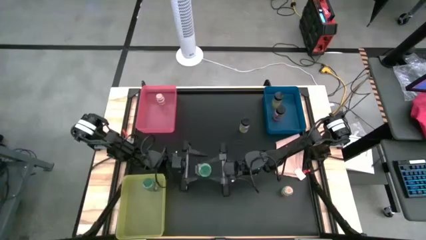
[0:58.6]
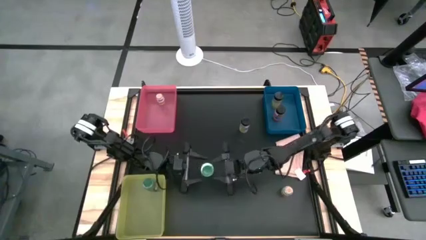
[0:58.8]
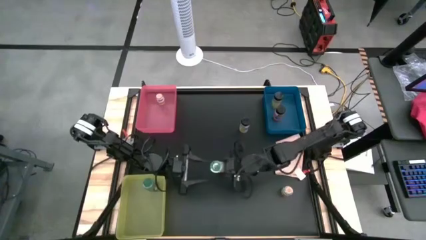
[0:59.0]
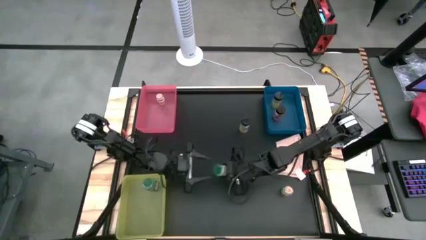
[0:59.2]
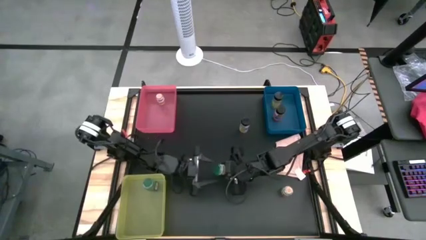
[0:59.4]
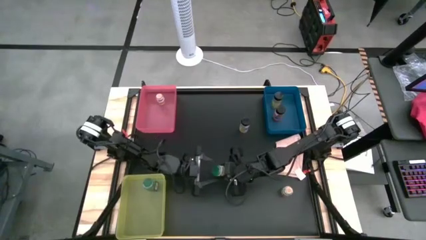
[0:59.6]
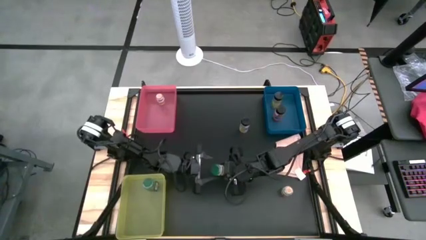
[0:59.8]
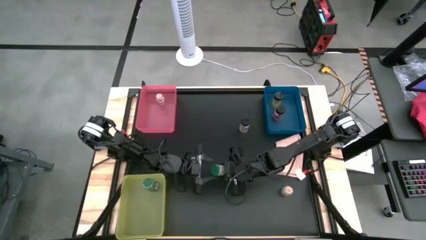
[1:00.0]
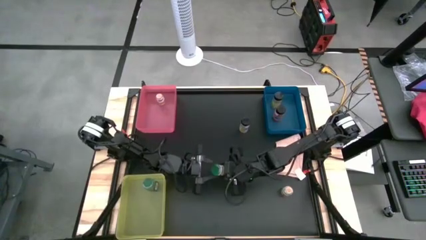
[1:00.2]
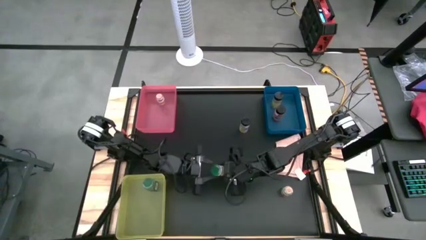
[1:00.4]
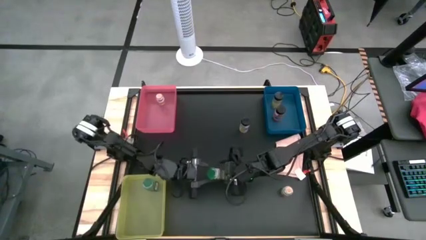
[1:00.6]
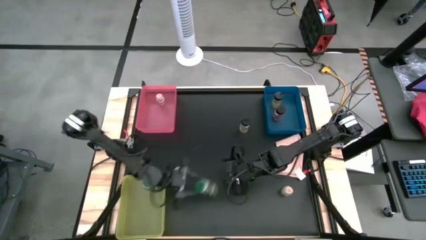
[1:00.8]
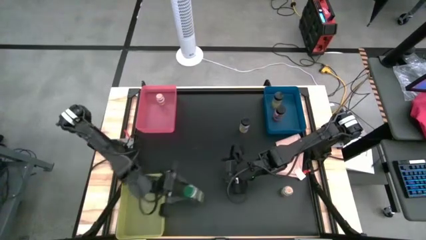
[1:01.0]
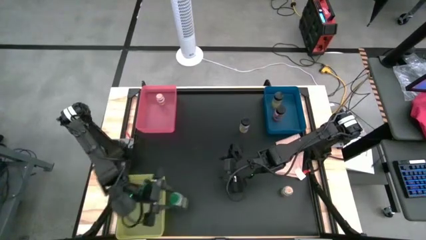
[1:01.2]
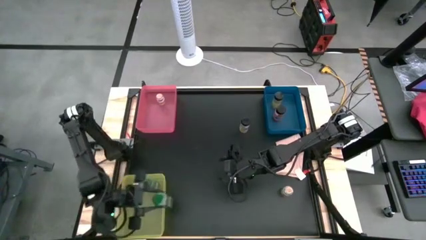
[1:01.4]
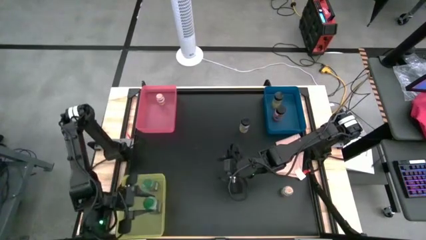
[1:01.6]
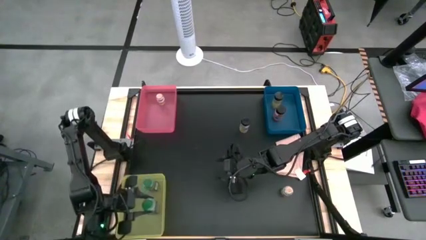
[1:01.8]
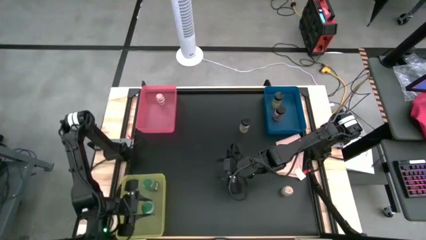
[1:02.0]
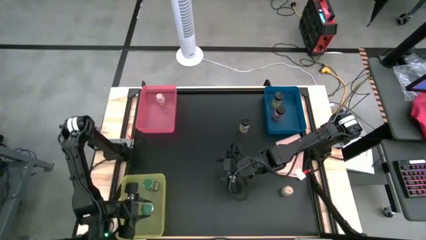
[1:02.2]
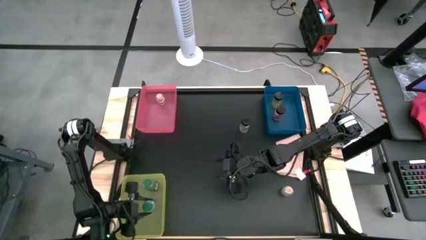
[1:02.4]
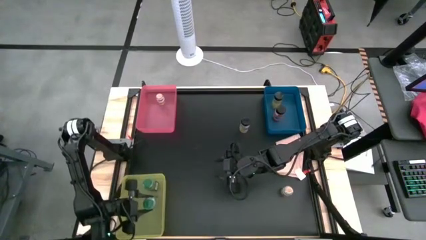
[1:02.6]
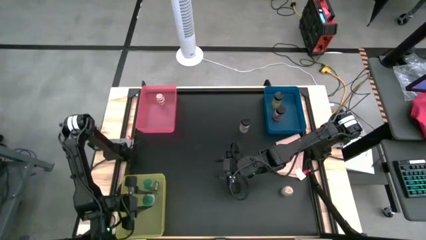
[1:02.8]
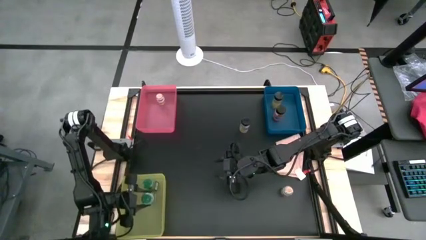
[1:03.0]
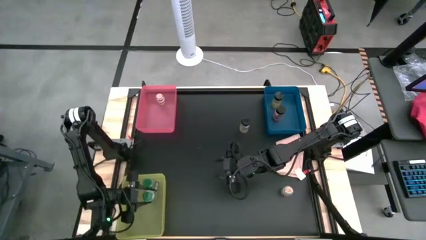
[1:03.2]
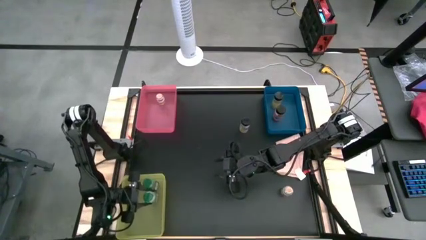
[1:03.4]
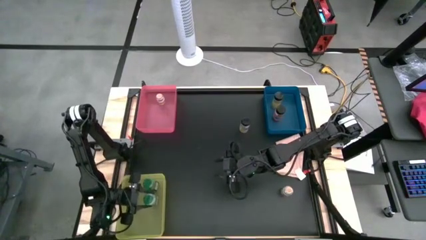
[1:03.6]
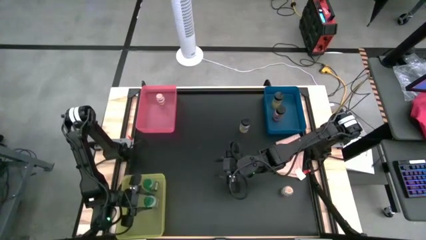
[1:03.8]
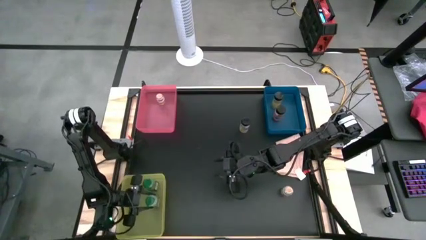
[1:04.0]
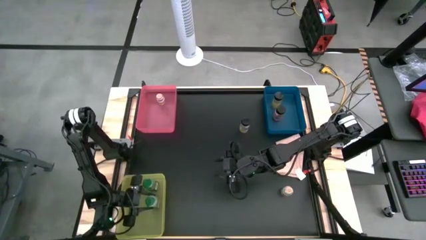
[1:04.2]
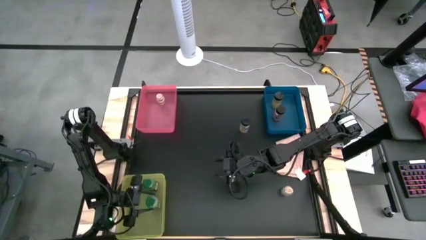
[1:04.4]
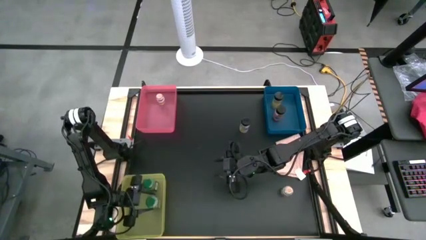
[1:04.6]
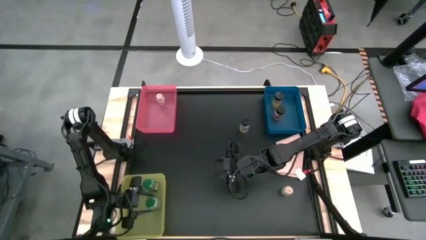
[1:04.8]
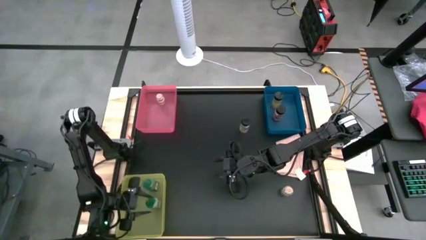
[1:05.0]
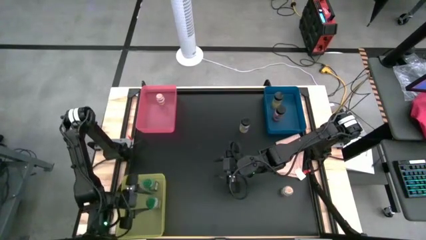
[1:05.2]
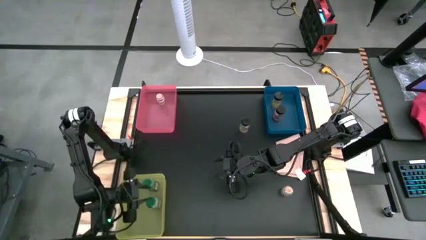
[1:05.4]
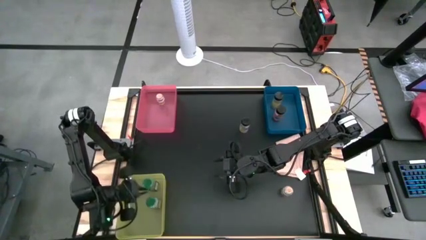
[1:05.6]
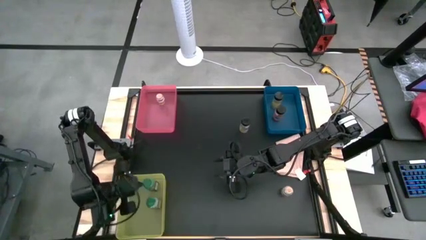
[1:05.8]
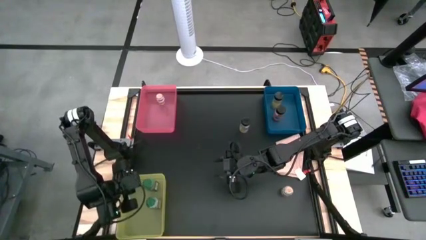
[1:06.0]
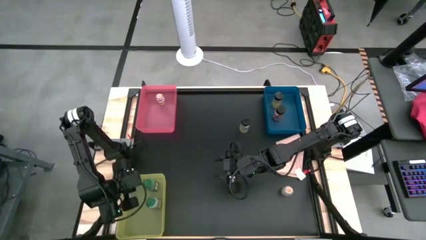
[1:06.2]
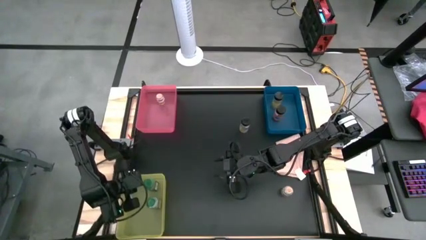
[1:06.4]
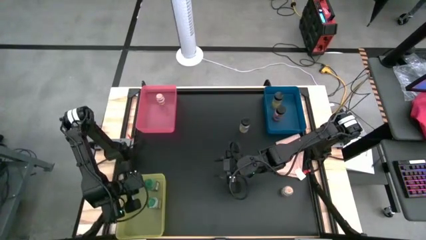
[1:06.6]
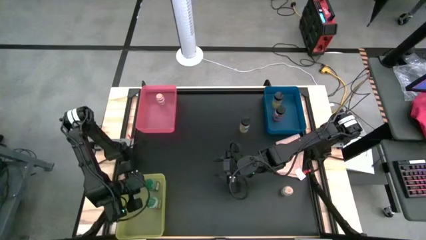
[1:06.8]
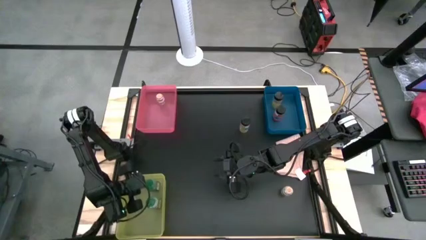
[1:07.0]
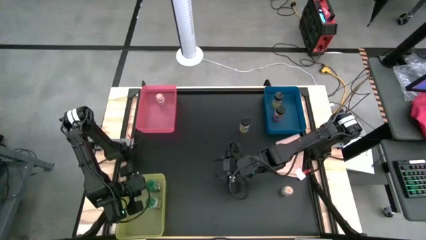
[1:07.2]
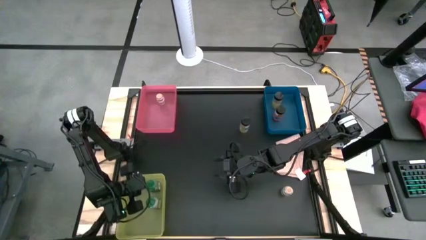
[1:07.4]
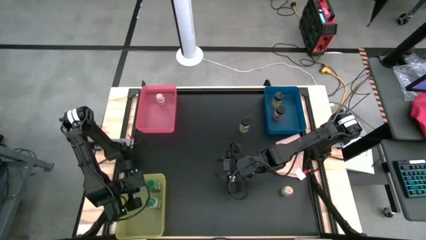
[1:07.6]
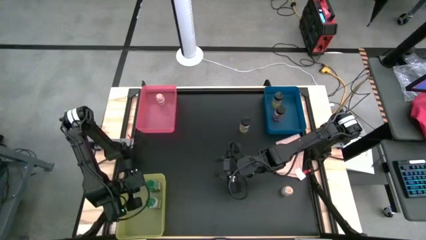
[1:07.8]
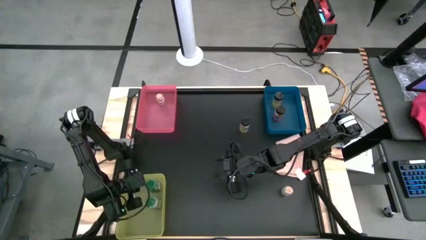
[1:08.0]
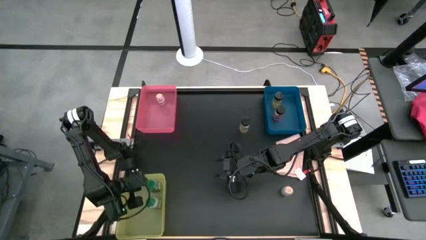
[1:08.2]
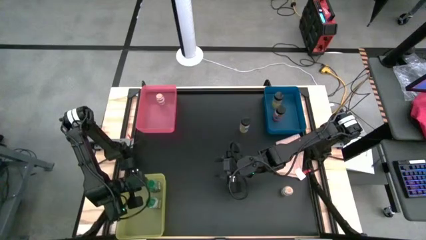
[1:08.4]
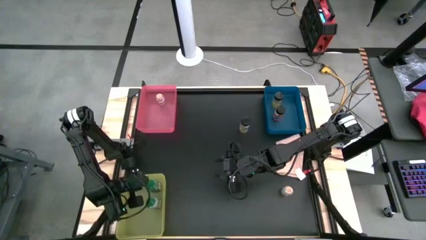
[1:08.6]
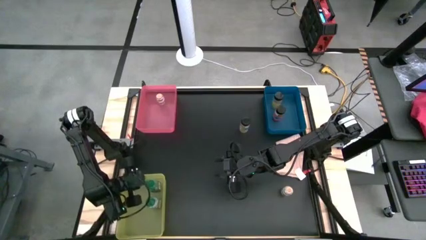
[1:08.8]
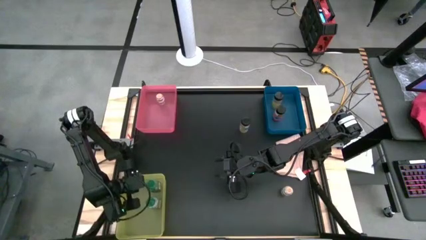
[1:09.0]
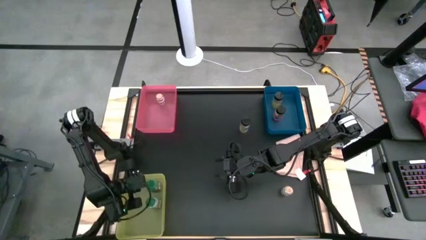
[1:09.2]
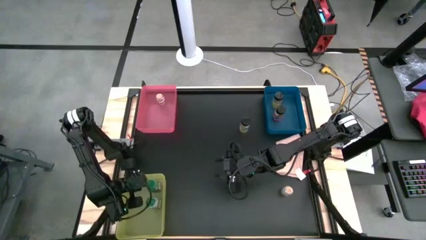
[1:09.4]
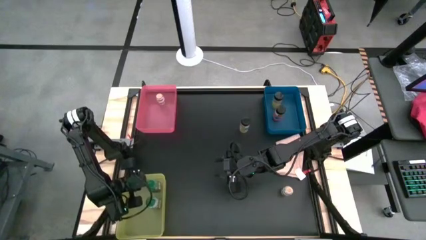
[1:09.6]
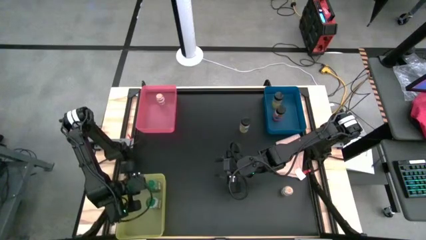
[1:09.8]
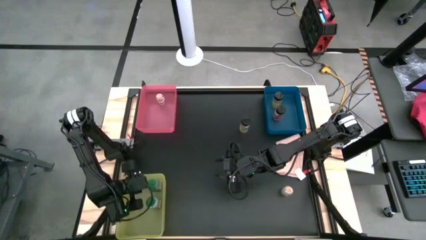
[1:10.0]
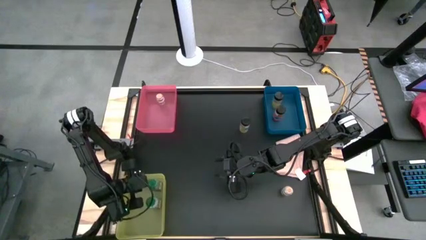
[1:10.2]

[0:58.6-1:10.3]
Task: Sort spices by type
Put the green seasoning into the yellow bin

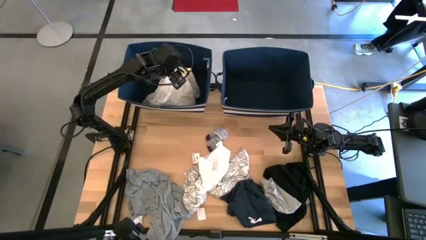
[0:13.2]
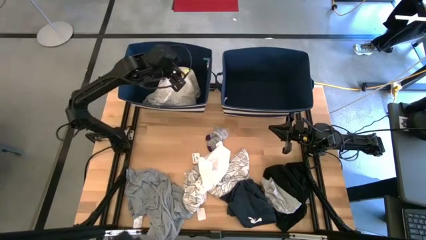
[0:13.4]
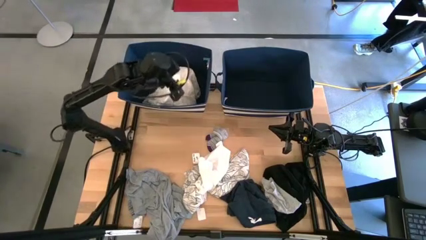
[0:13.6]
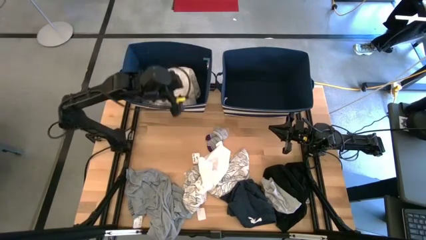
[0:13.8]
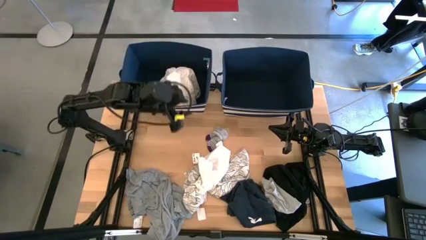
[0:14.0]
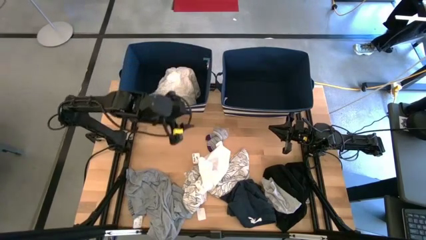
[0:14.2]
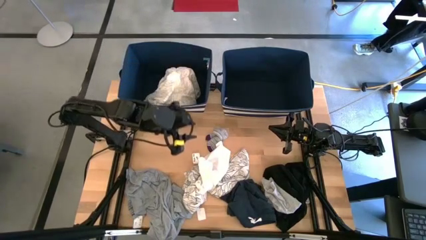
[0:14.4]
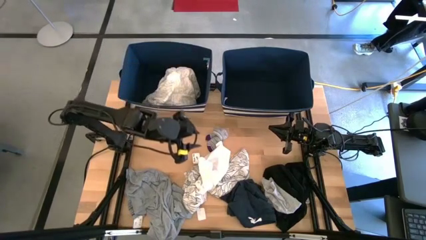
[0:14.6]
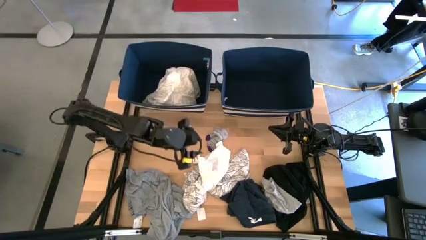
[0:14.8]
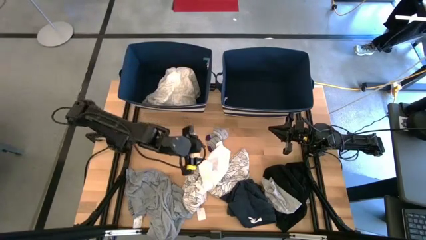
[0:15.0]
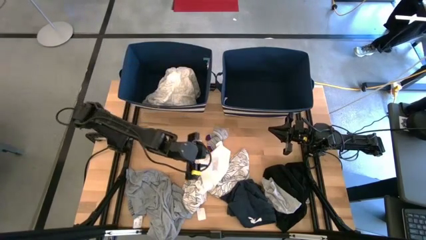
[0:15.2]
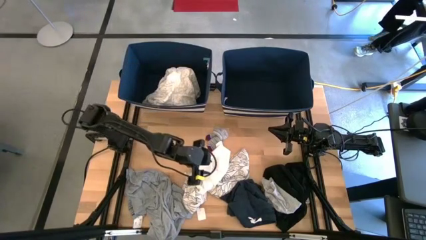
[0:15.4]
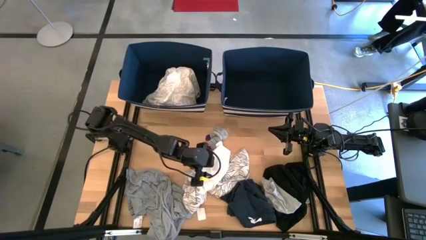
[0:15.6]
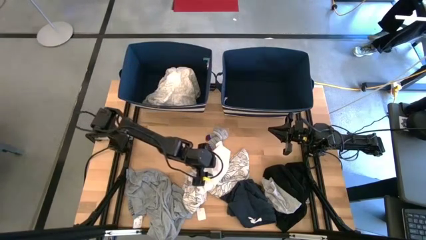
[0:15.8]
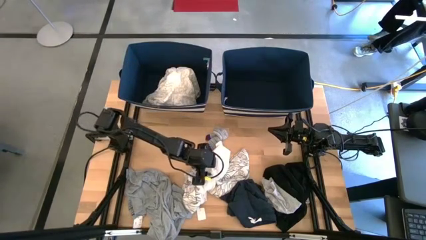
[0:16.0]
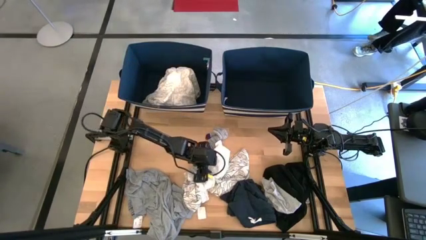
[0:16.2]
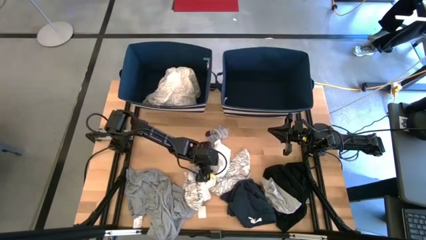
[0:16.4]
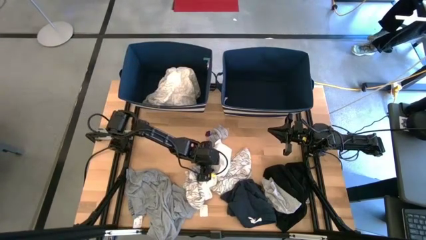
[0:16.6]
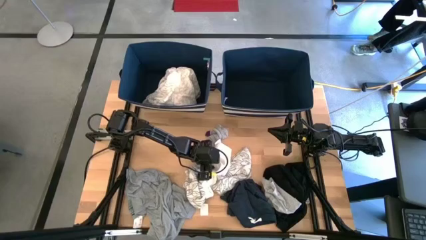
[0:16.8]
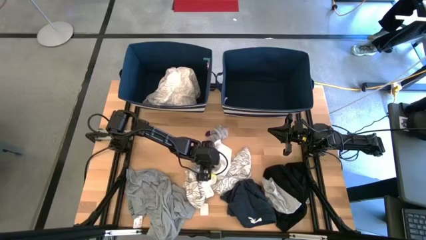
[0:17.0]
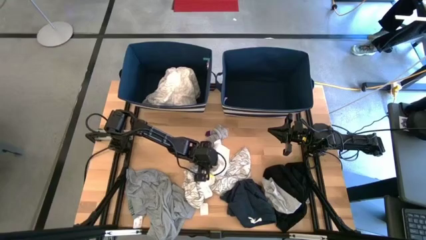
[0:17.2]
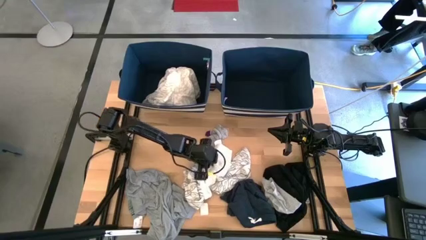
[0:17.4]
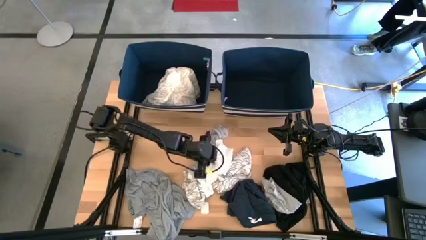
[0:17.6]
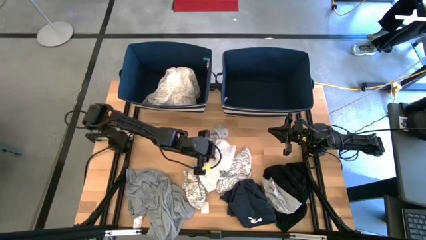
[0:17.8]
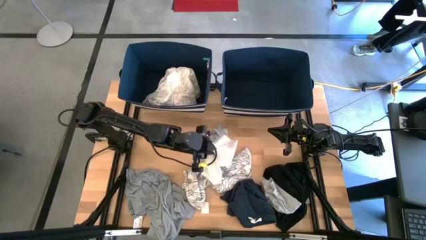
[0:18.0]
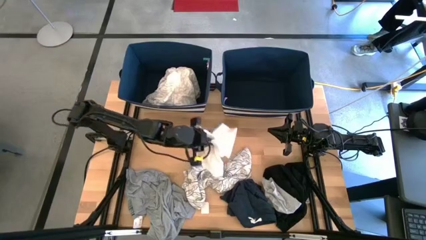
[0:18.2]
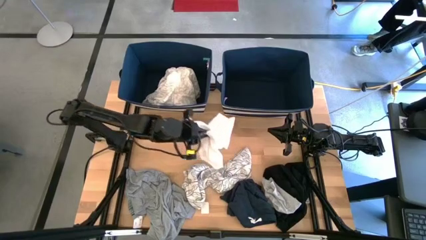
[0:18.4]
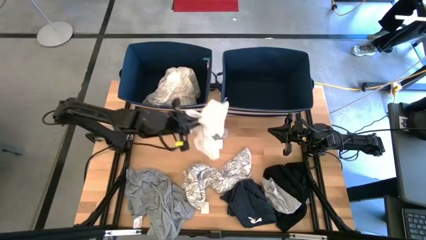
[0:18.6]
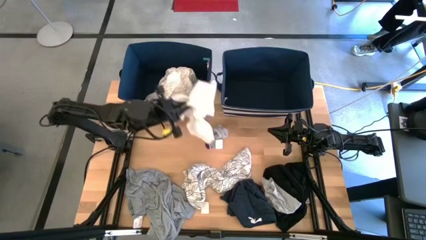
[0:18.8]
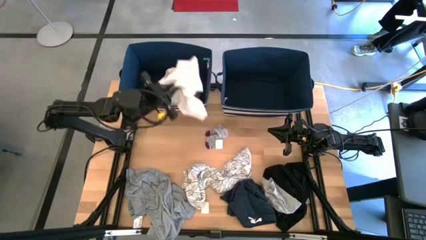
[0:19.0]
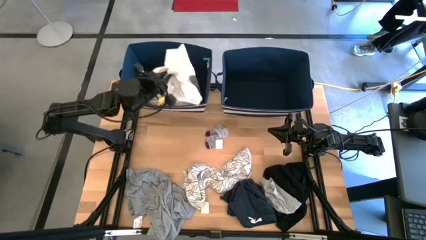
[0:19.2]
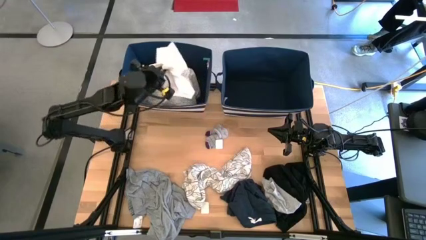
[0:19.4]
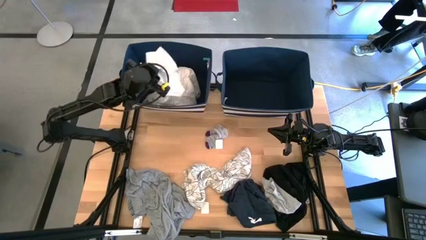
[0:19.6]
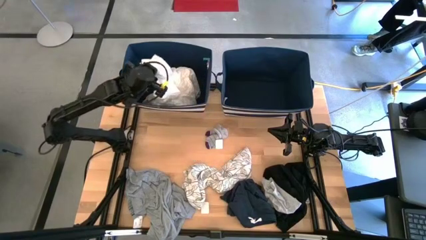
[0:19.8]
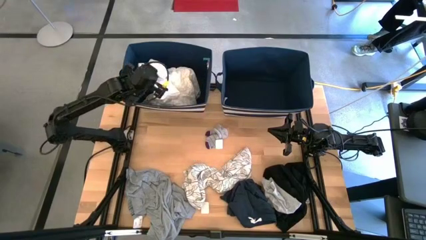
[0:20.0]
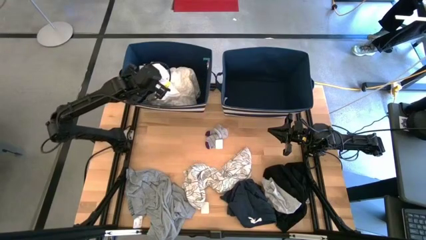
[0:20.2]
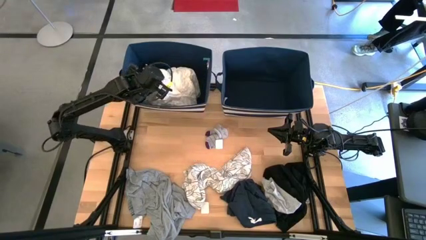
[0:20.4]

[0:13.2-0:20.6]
Task: Sort clothes
Put the white shirt into the right laundry organizer
